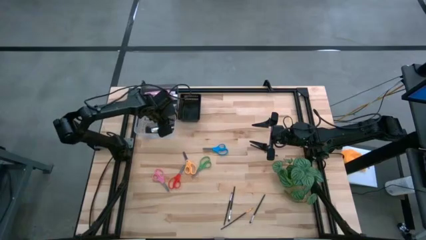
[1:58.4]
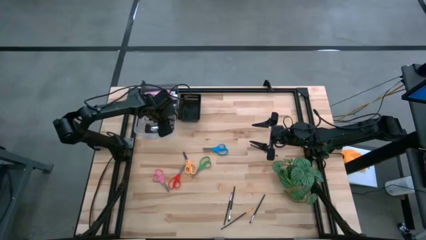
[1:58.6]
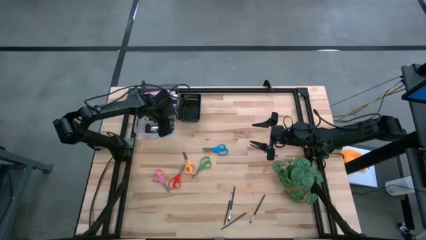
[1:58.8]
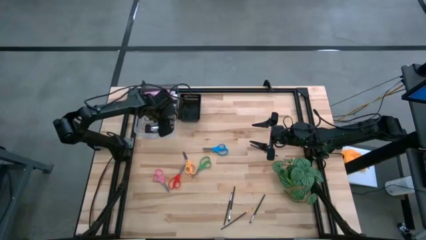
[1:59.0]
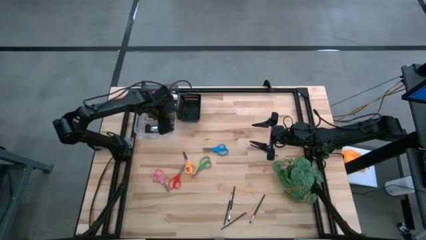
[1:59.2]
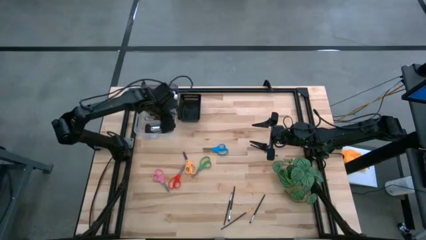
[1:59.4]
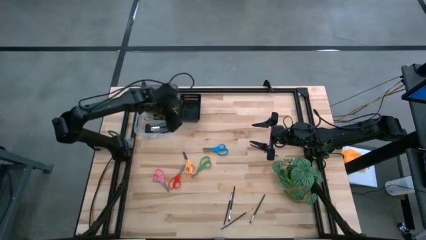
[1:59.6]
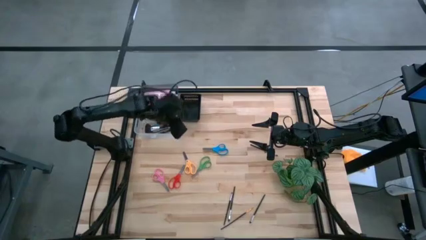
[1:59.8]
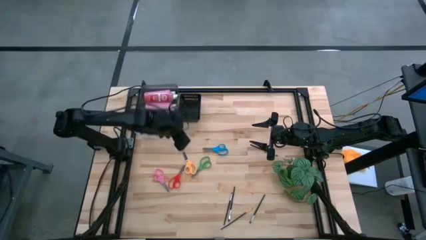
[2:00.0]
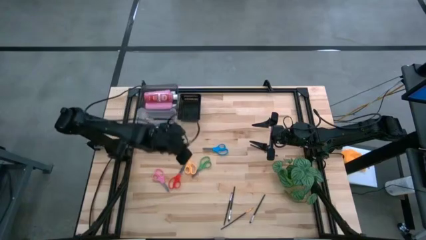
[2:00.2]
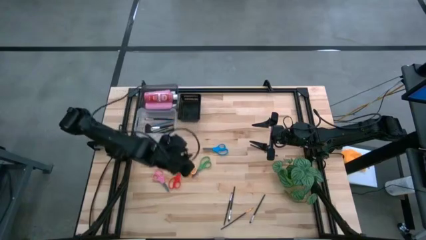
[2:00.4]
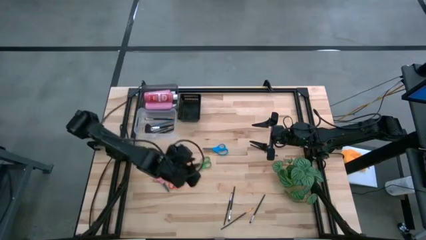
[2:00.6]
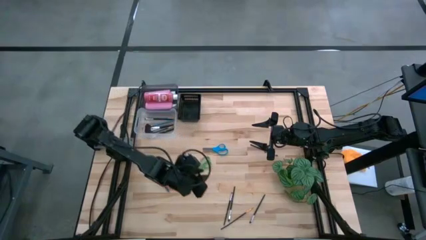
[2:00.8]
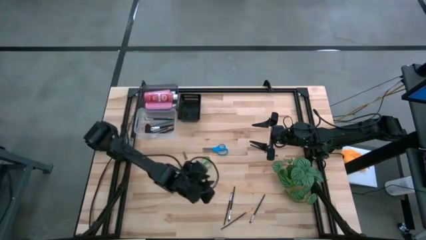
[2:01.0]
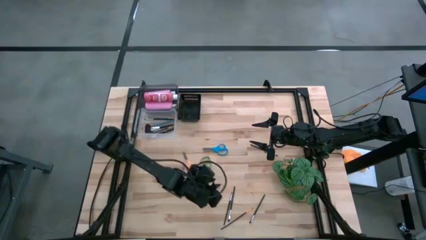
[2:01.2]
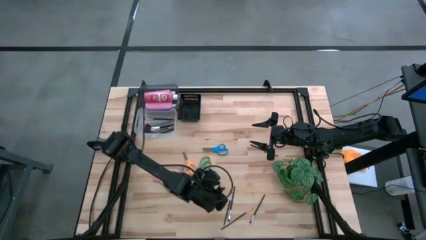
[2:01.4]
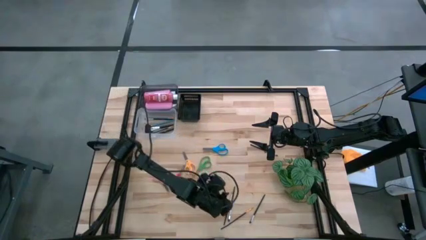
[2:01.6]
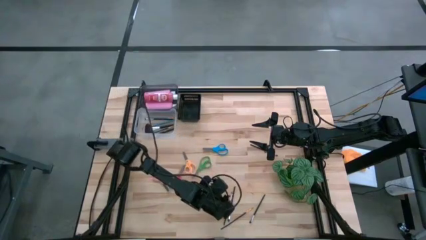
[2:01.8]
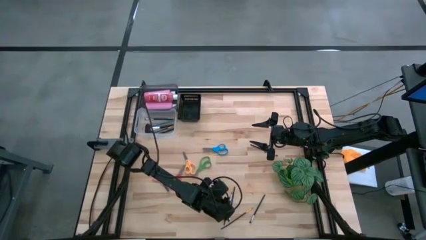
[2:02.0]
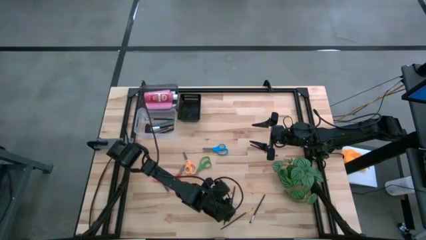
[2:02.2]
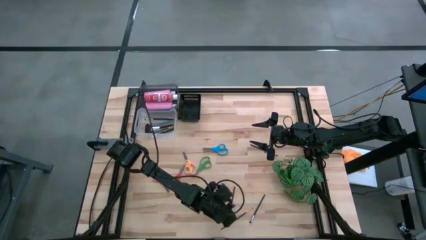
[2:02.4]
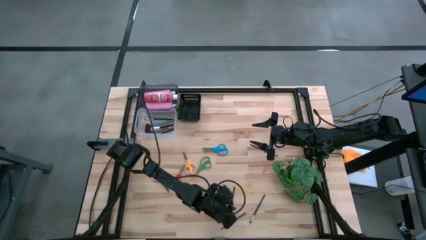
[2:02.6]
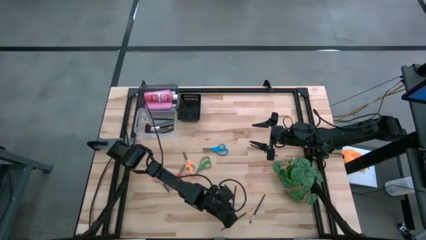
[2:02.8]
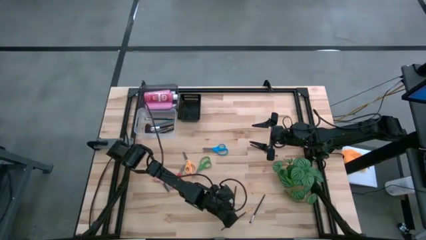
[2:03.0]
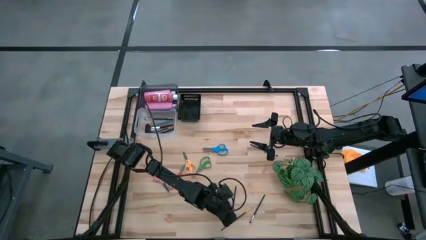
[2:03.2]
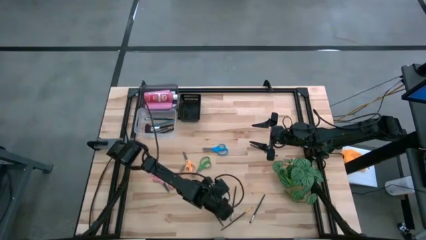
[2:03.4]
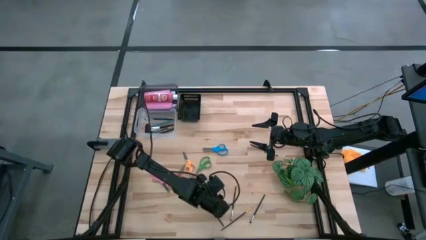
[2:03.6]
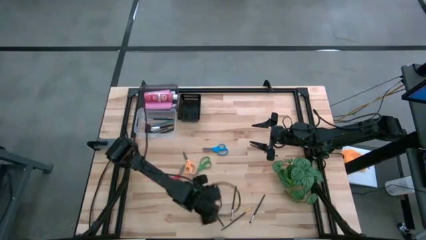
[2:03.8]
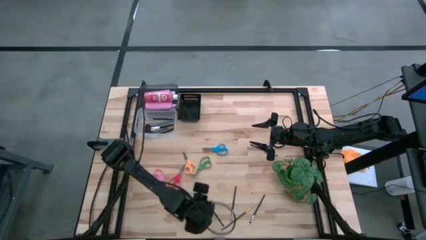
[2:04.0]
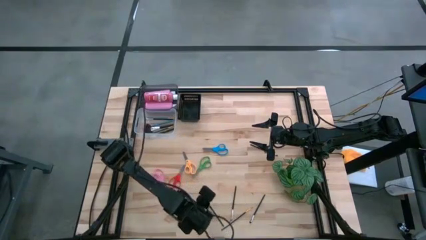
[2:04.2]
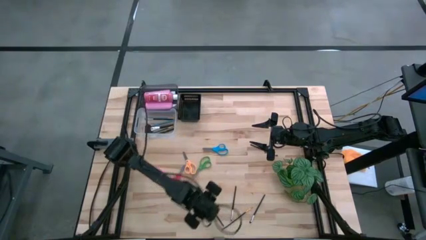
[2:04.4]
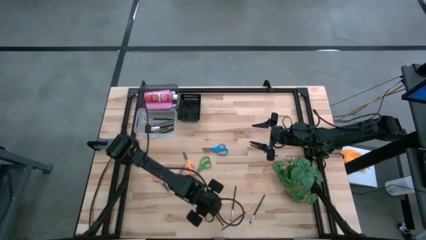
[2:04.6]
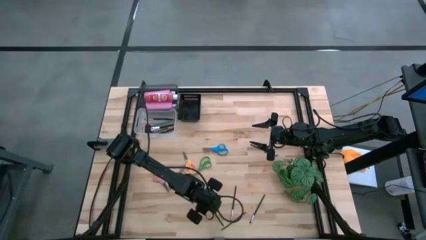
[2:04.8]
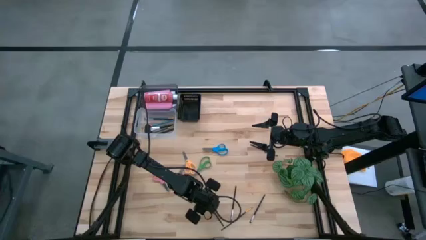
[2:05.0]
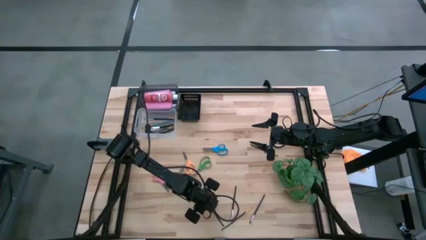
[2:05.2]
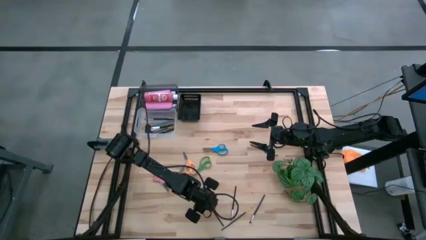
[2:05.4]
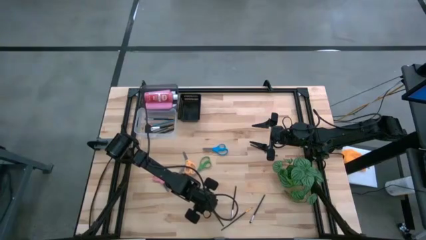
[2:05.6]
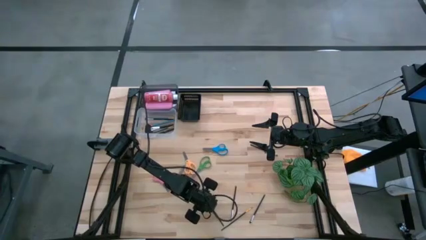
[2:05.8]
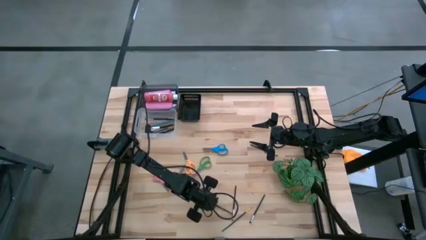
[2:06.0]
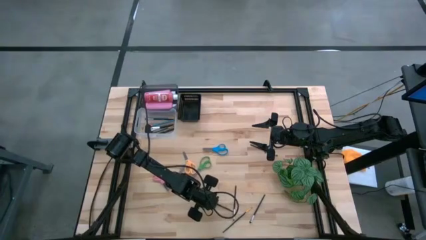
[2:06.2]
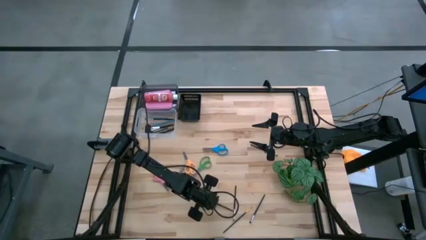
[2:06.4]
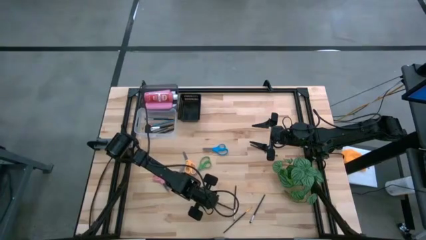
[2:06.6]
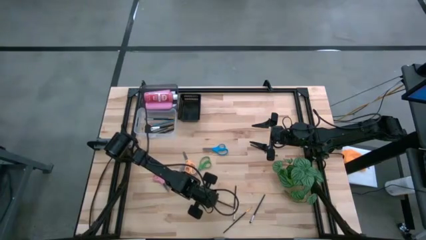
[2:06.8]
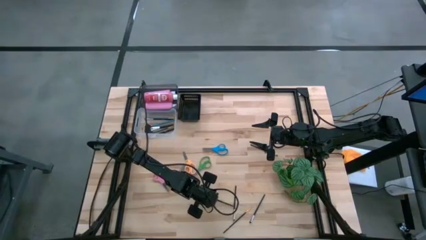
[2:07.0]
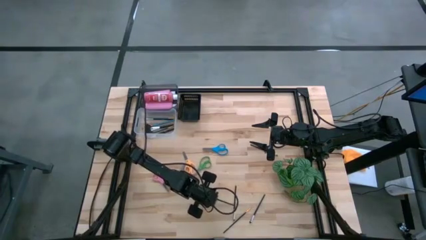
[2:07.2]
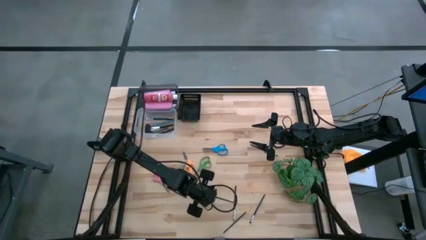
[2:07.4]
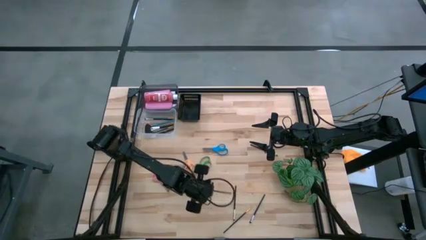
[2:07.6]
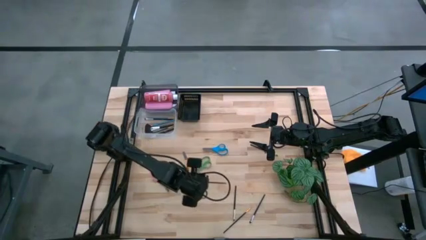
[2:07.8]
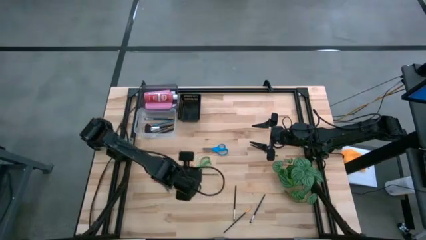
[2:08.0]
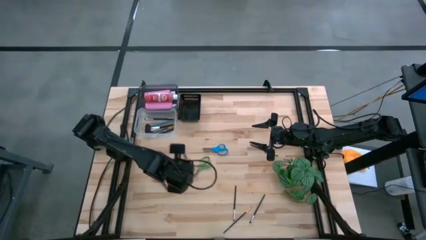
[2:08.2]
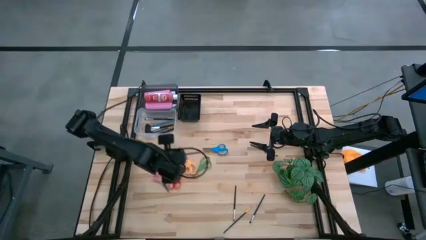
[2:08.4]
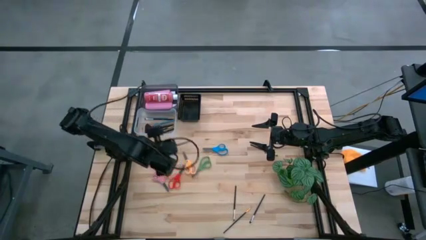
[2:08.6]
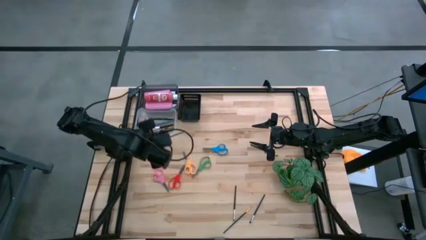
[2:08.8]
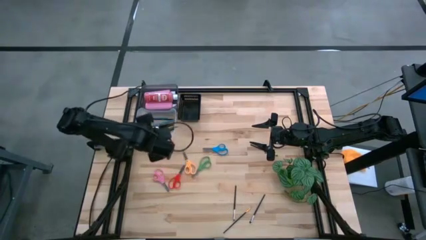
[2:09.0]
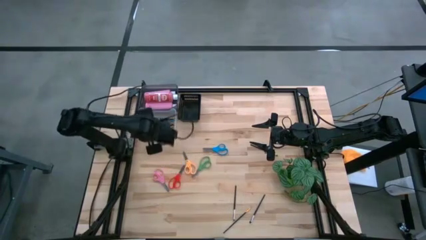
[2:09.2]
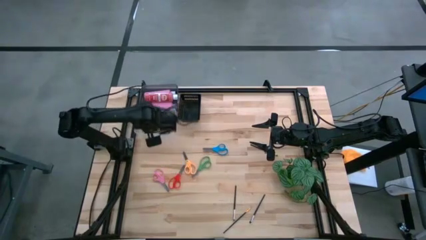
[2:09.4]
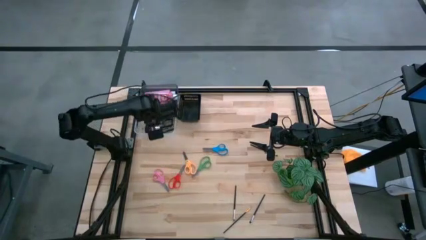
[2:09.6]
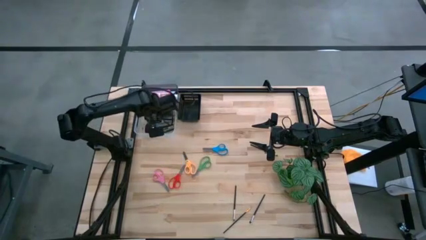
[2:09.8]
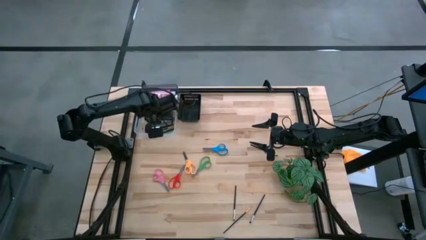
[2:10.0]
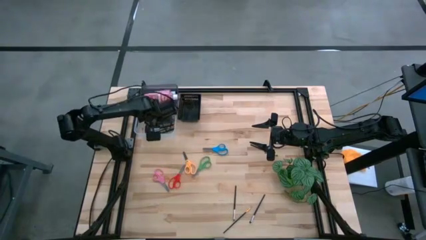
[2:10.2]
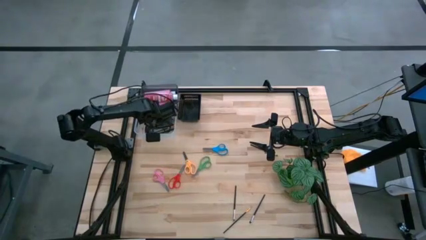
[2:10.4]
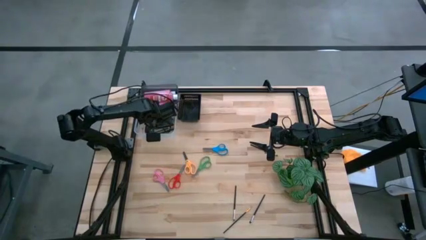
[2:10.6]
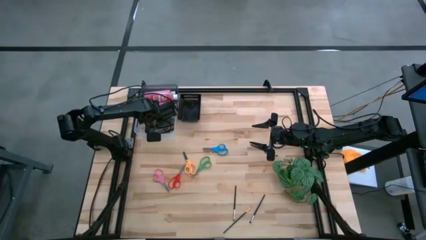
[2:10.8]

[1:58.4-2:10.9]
Task: Pick & Place Paint Supplies
Put the black paint brush into the transparent bin

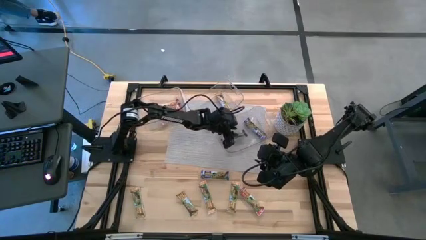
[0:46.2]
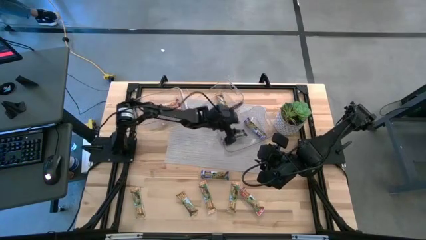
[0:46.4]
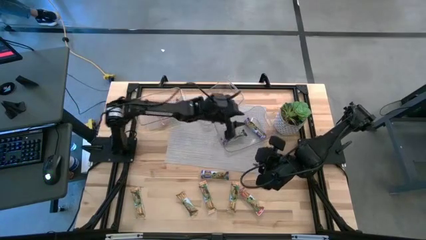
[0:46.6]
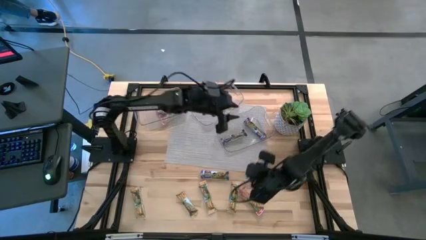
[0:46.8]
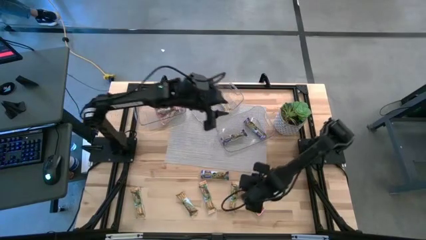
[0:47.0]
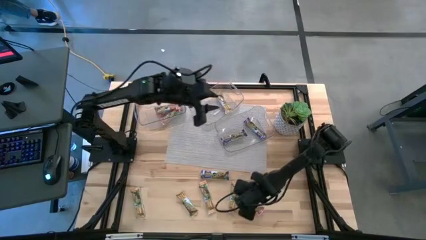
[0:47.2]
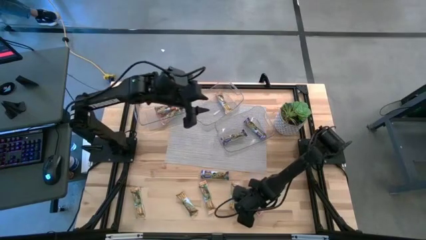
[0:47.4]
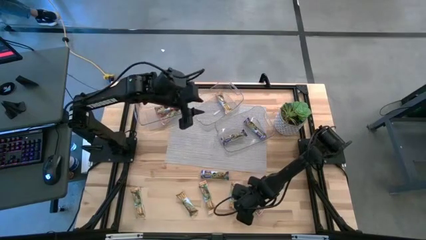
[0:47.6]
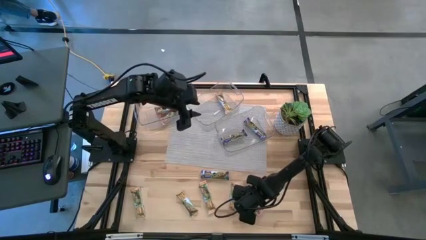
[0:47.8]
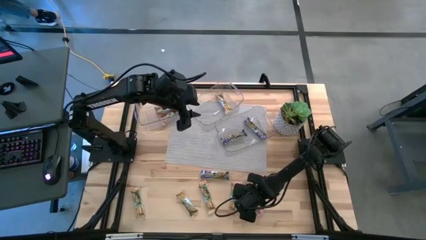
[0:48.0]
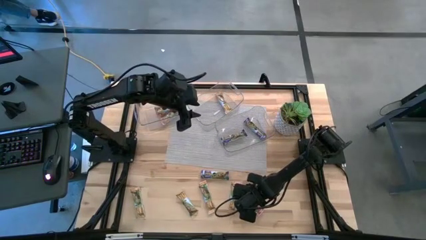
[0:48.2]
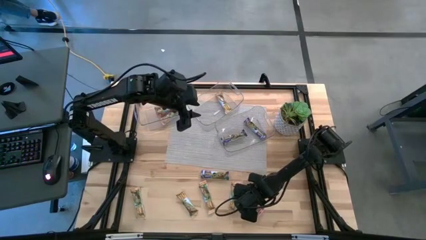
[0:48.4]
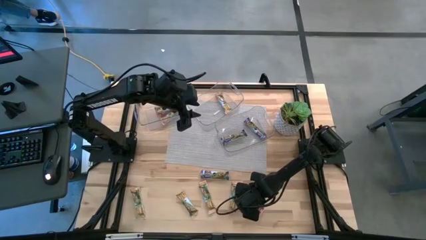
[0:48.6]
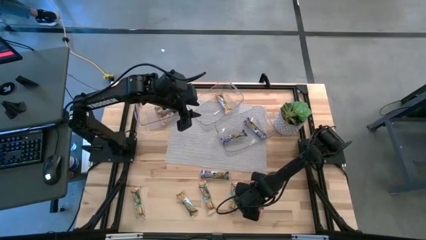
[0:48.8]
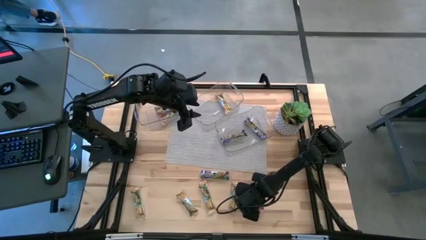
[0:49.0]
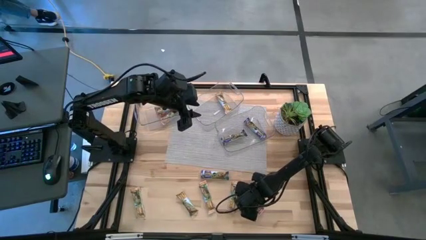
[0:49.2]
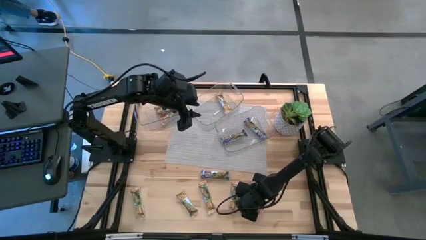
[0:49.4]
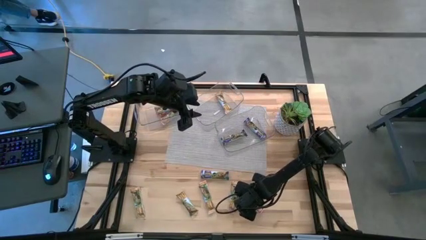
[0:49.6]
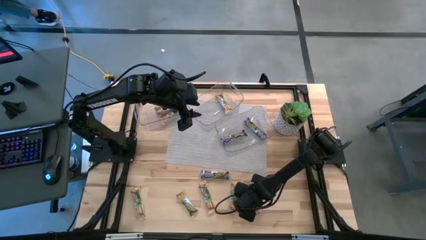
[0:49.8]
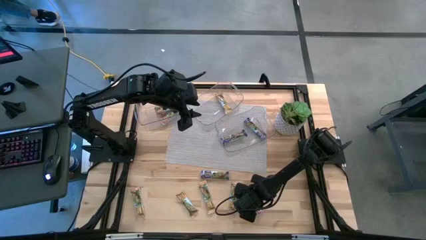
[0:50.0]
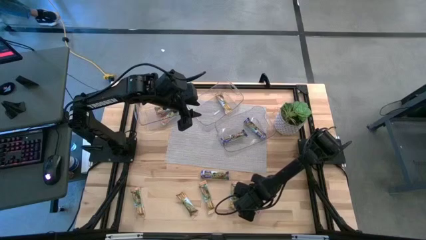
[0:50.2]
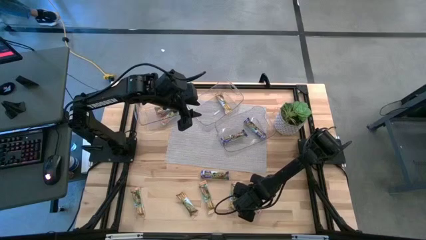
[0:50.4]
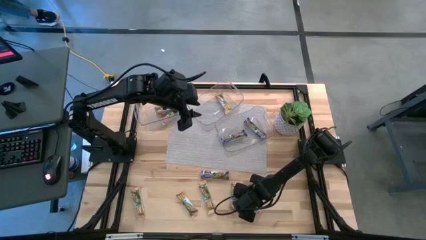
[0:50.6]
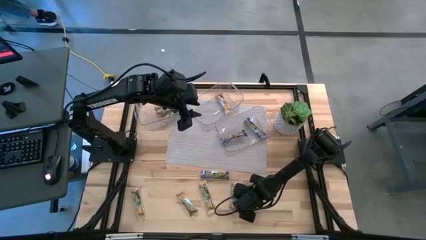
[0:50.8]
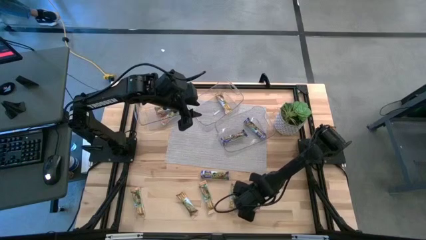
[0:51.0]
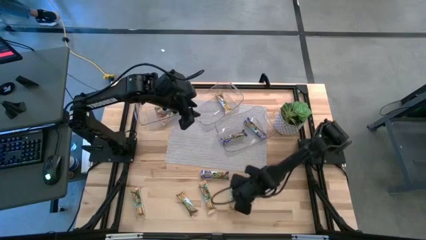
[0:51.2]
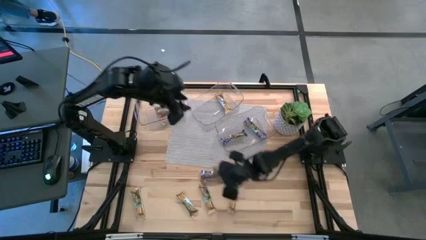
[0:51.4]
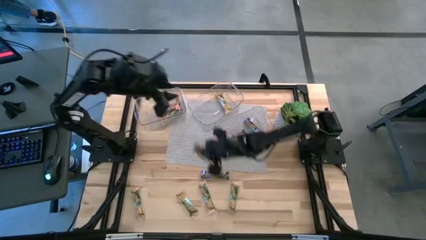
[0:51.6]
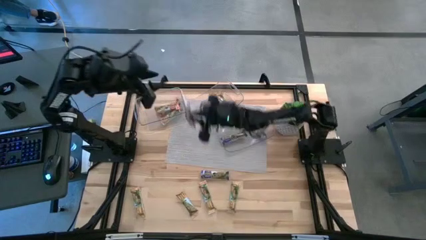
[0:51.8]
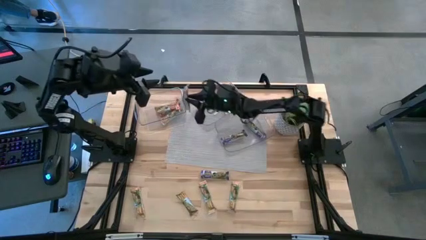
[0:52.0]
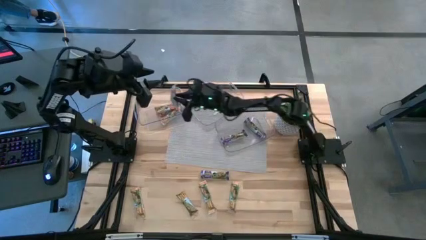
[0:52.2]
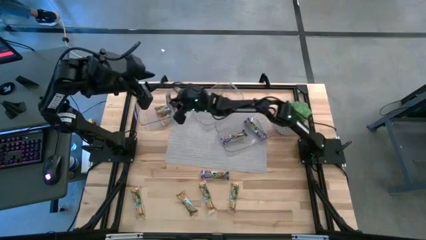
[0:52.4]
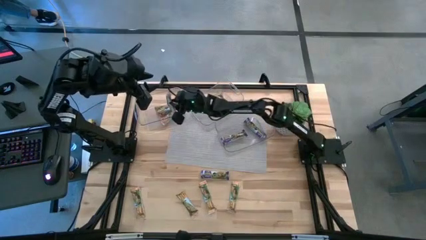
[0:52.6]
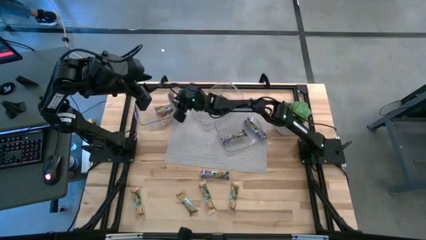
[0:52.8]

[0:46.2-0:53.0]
Task: Pick and place Granola Bars by type
Put the red granola bar into the left transparent bin
